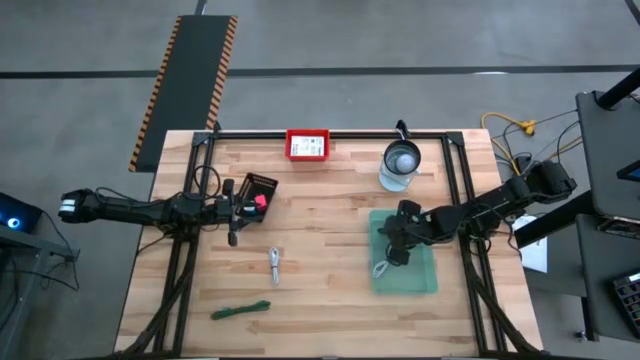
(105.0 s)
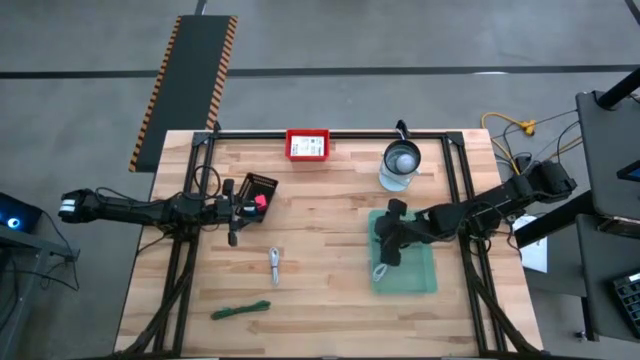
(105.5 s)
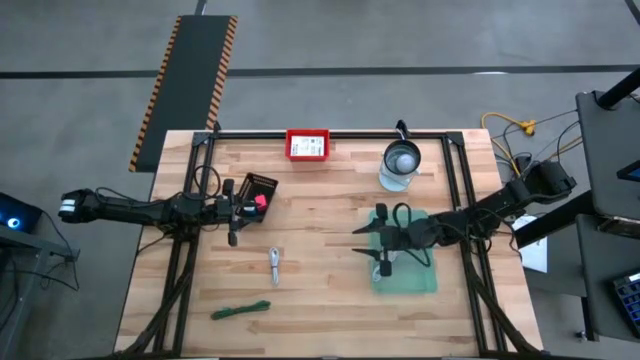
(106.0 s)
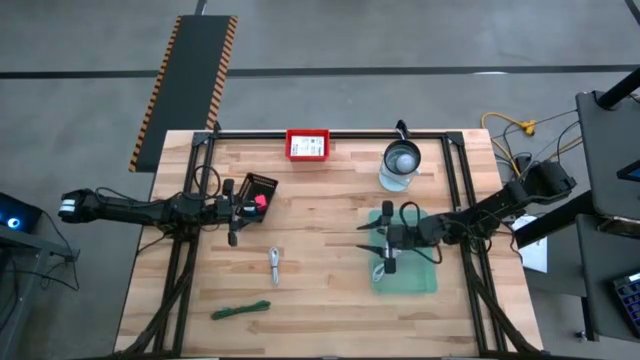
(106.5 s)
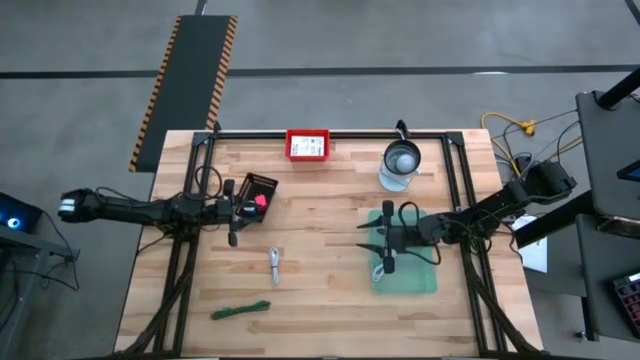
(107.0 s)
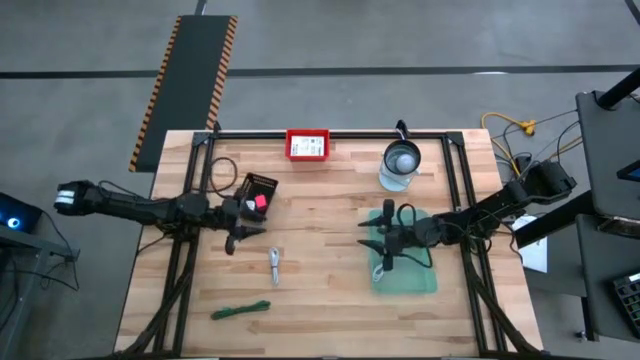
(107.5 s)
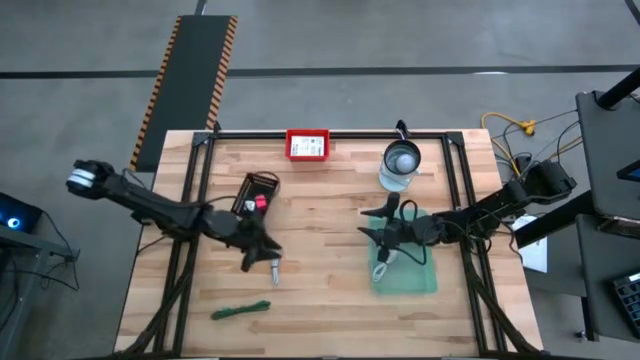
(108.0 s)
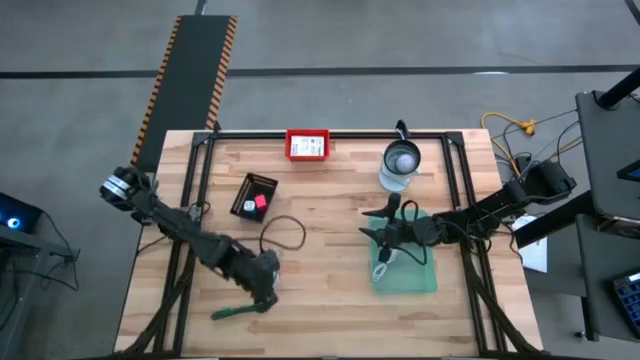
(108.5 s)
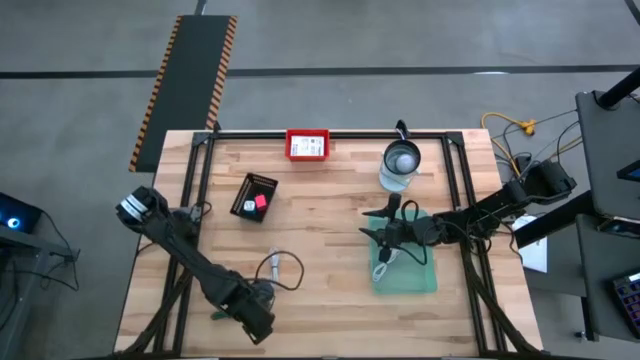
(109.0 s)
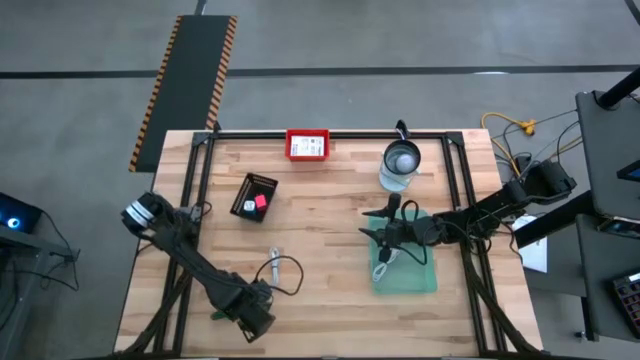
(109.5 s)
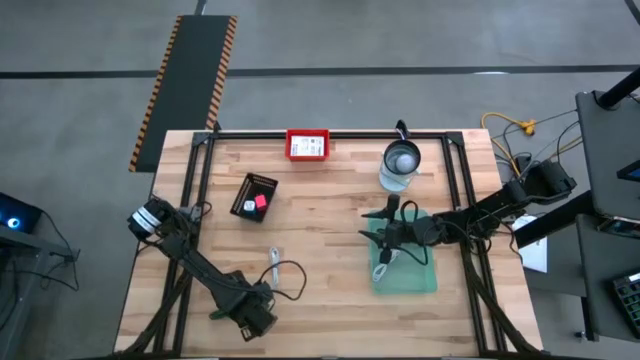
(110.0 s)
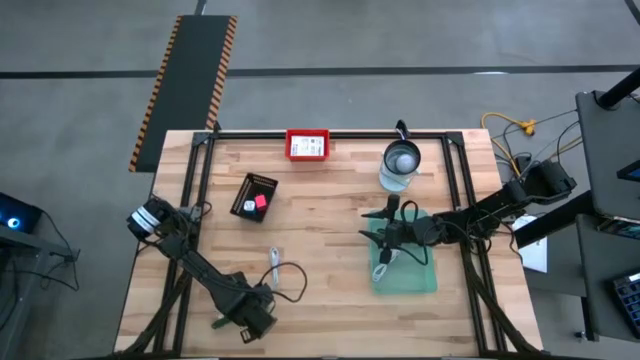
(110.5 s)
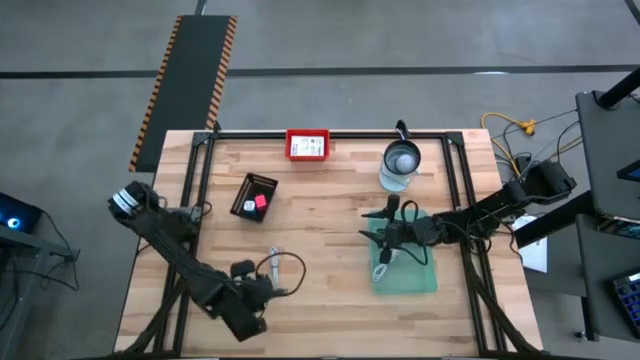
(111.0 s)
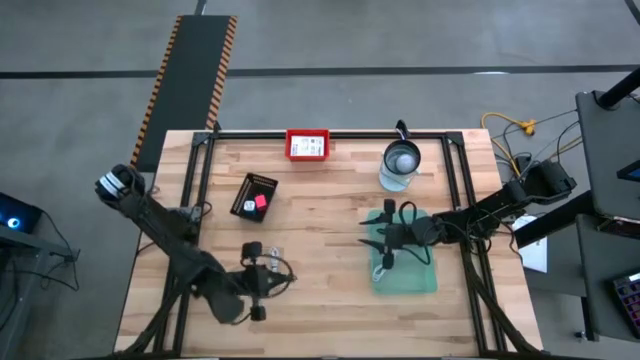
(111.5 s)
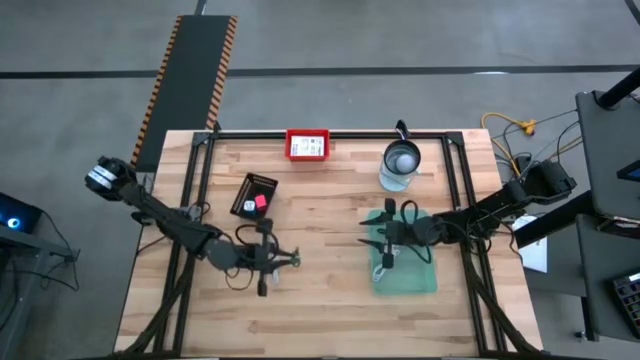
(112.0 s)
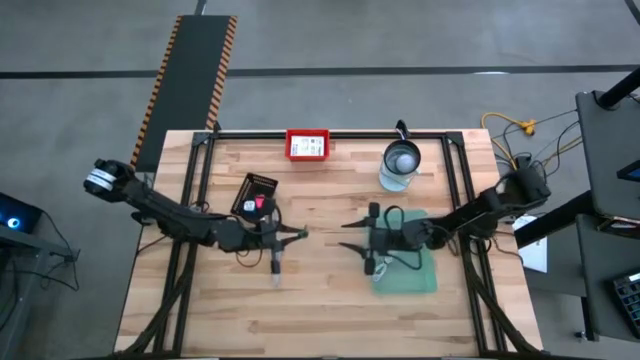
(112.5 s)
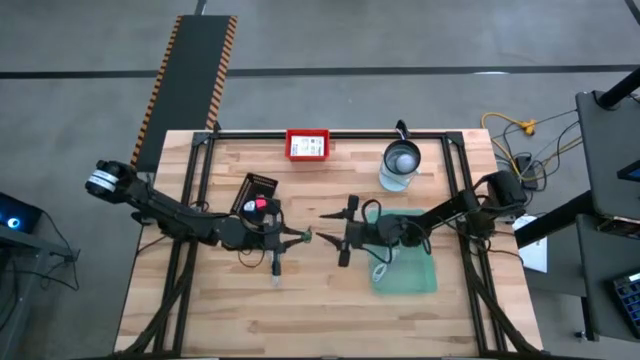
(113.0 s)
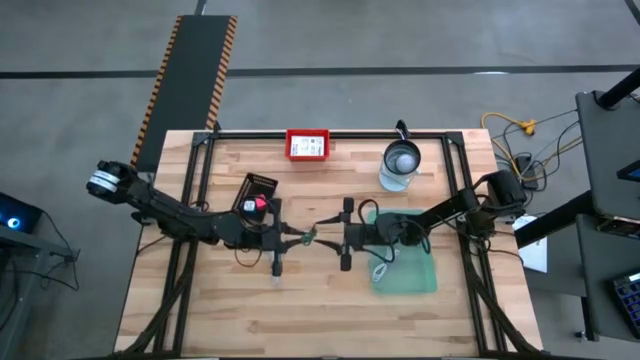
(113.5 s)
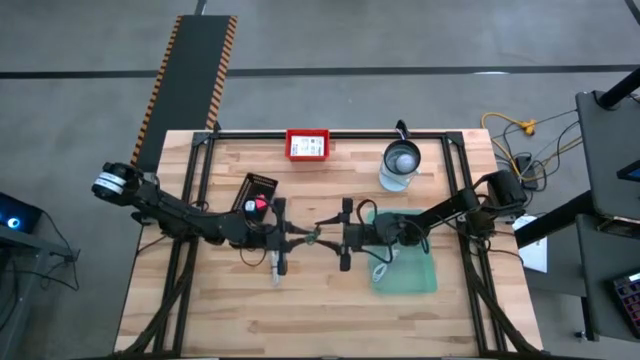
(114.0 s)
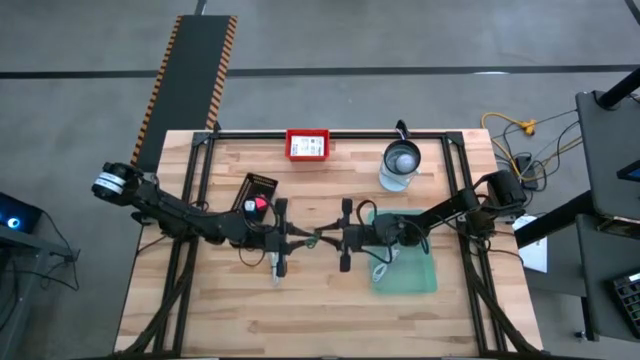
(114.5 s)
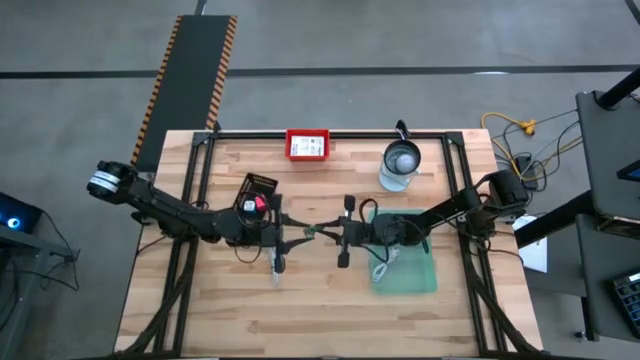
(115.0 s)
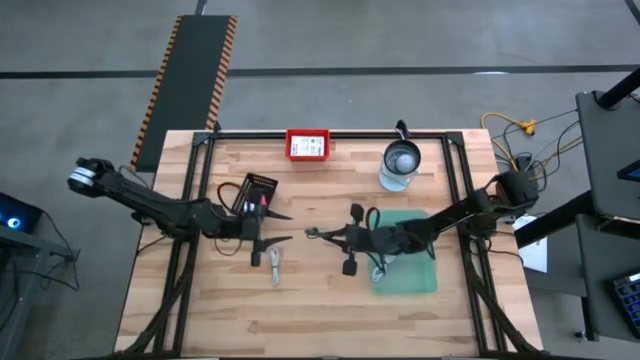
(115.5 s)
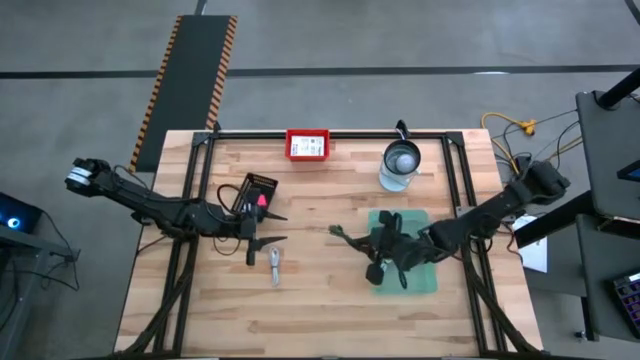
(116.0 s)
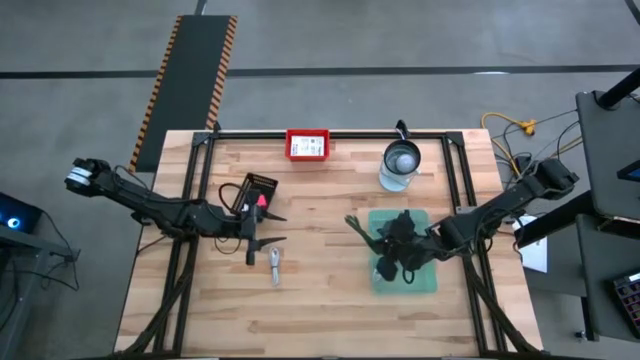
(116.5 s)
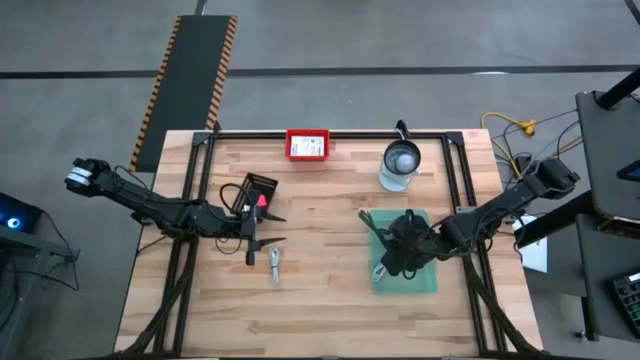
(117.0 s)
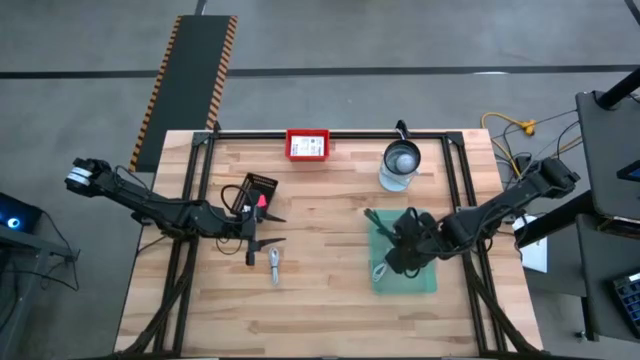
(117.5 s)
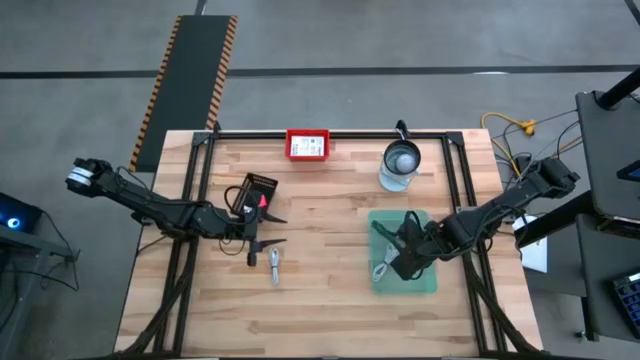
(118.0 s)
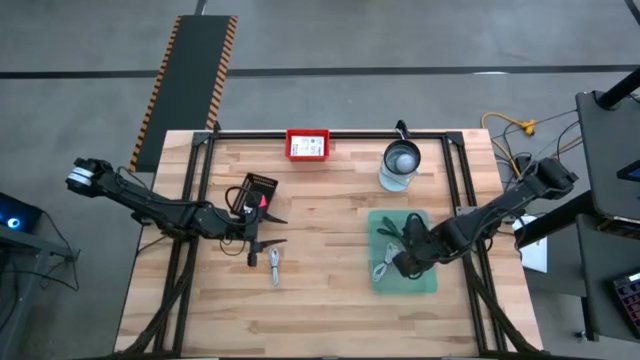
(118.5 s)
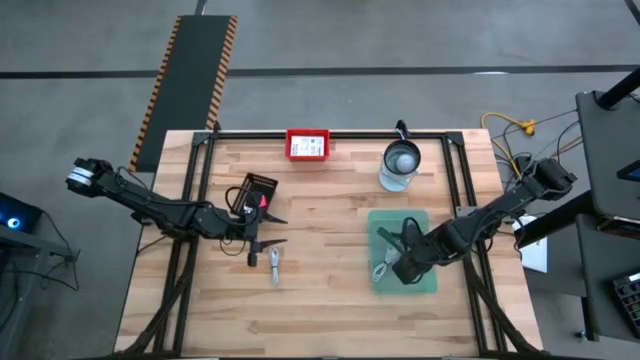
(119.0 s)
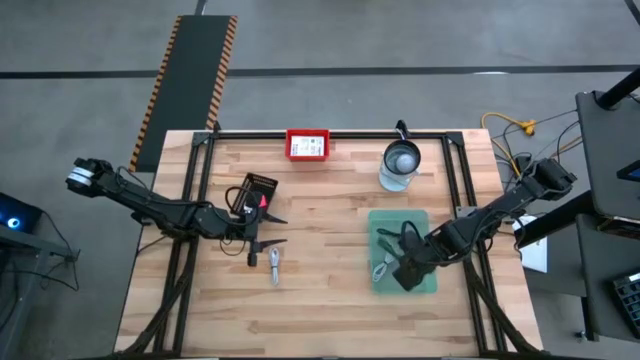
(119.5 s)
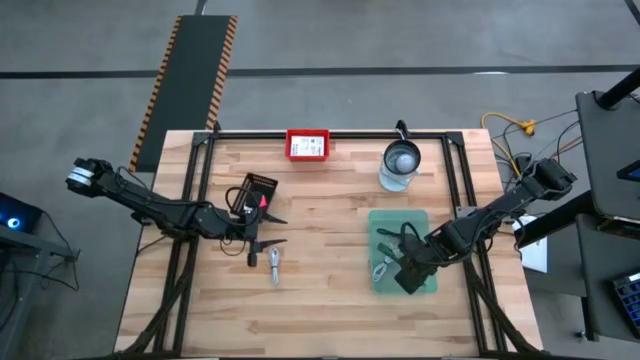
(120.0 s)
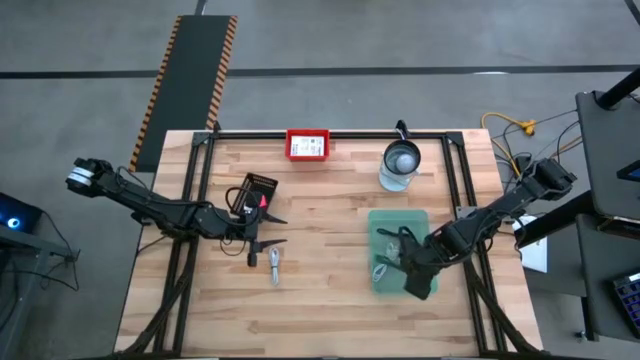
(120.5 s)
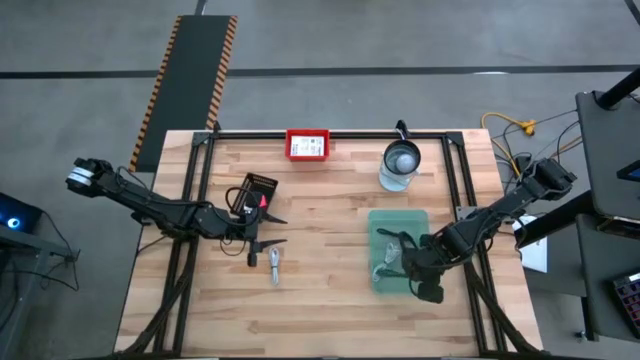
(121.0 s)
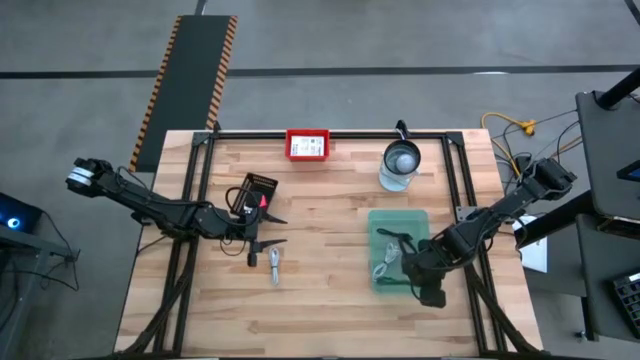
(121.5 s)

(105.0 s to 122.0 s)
Task: Pick and place items into bin
Put the green charger cable into the green bin

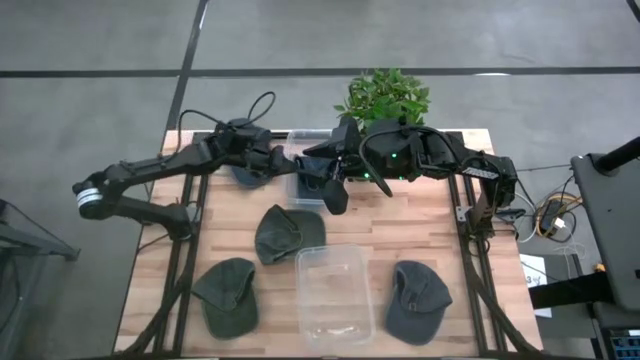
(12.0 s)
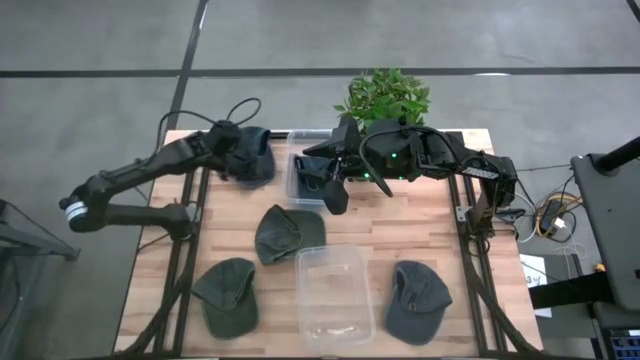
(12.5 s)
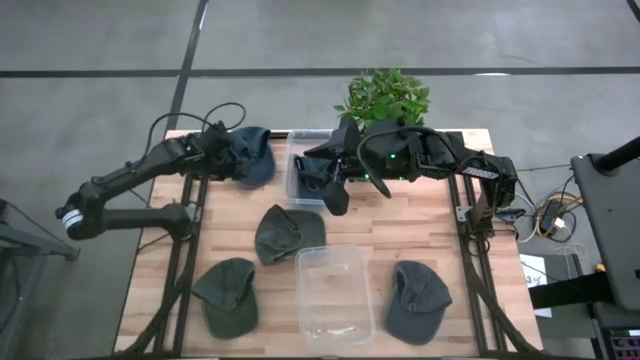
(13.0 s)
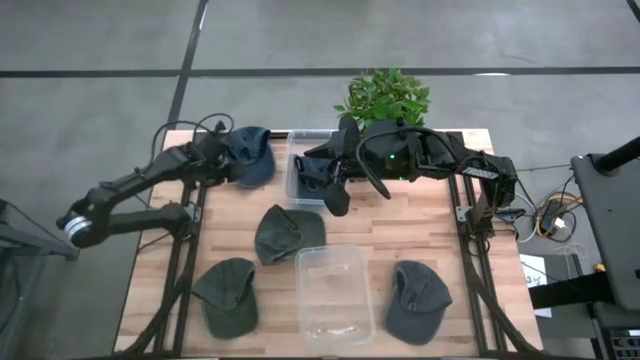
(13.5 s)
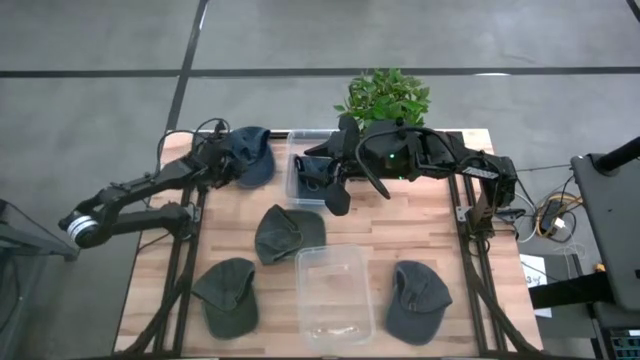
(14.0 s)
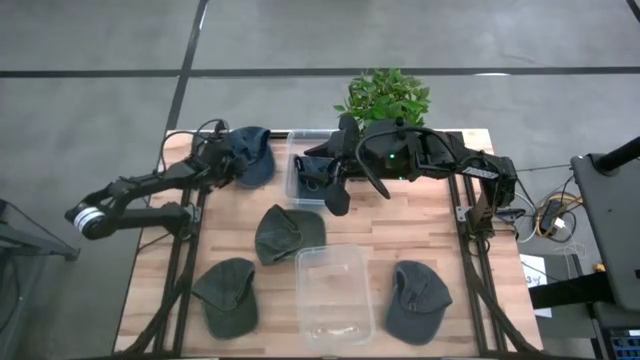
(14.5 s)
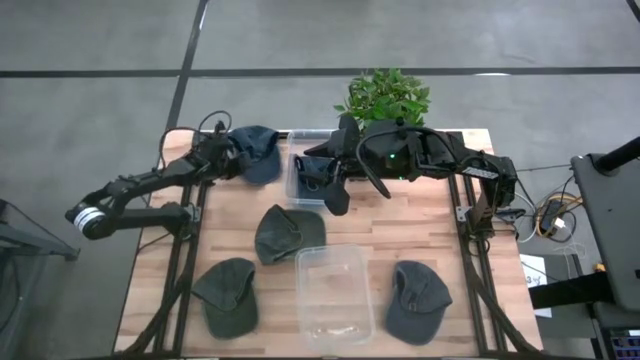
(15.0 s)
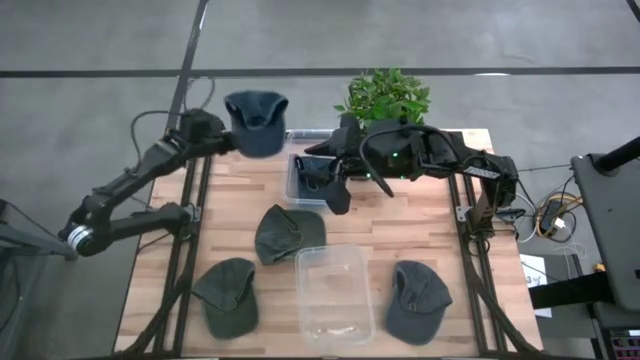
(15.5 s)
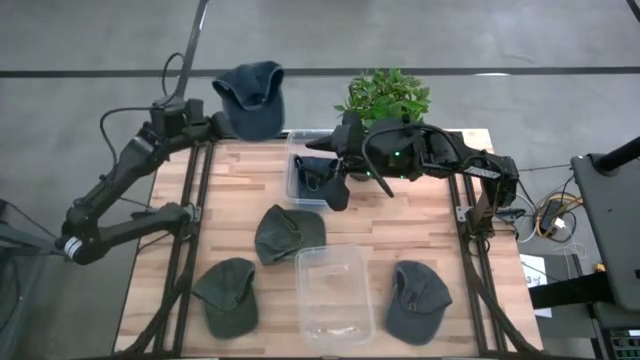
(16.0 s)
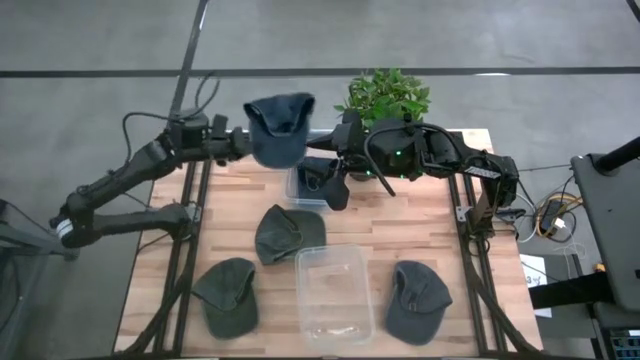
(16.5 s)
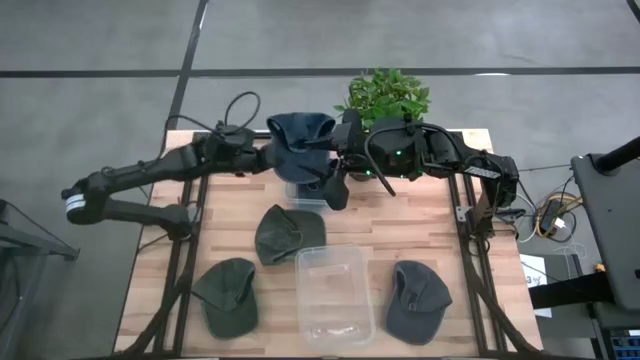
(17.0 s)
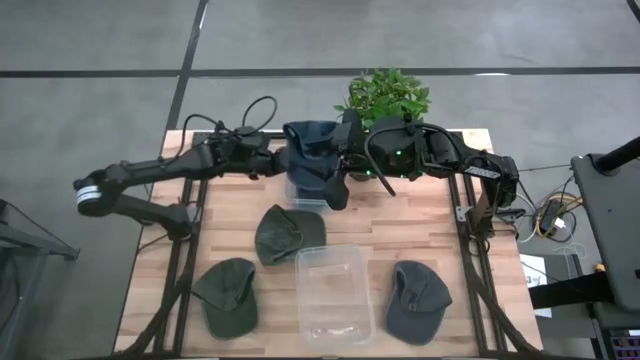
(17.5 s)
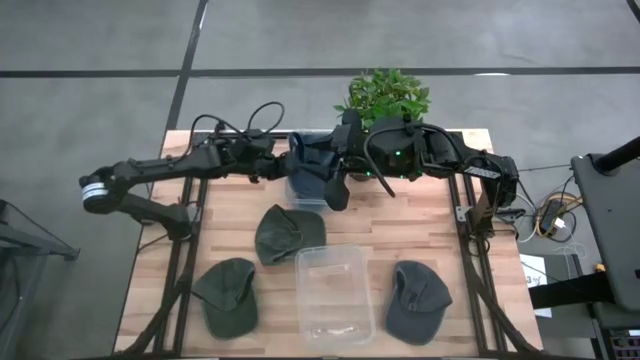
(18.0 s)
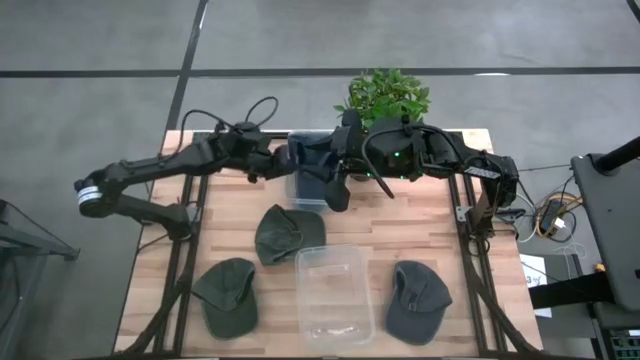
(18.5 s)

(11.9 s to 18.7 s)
Task: Pick & Place hat
Put the top blue cap into the top transparent bin
